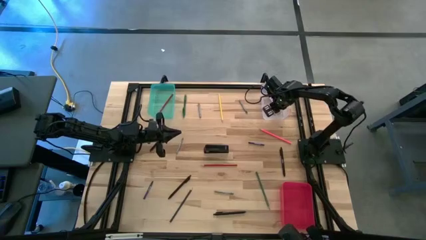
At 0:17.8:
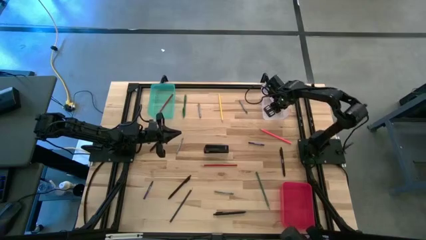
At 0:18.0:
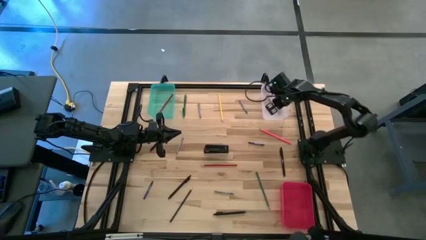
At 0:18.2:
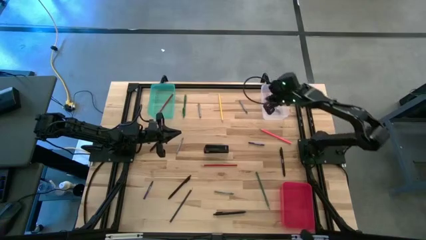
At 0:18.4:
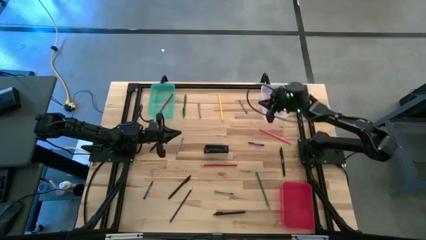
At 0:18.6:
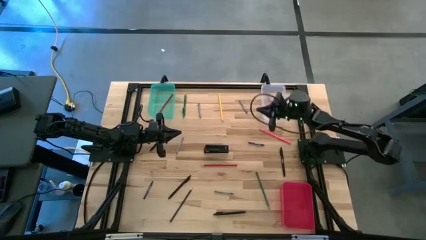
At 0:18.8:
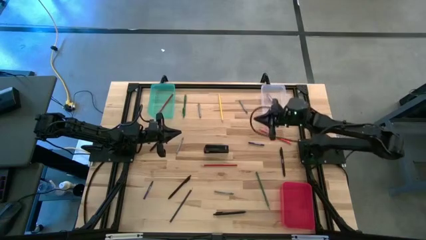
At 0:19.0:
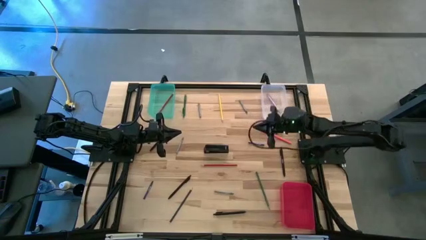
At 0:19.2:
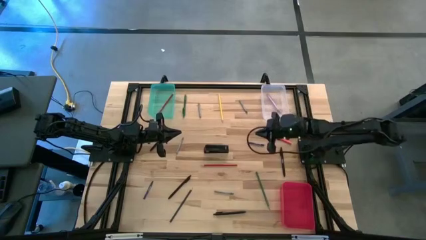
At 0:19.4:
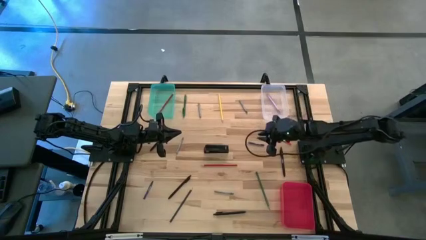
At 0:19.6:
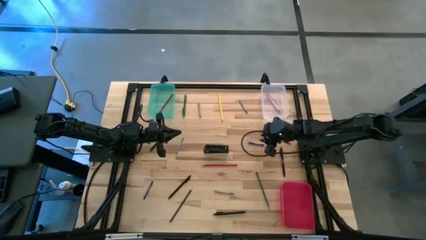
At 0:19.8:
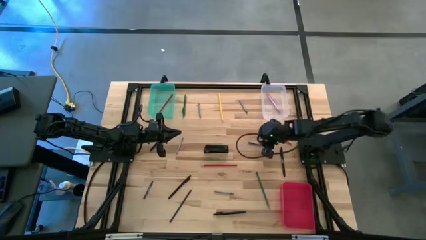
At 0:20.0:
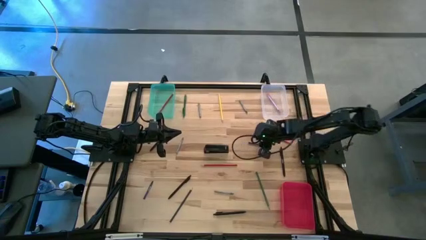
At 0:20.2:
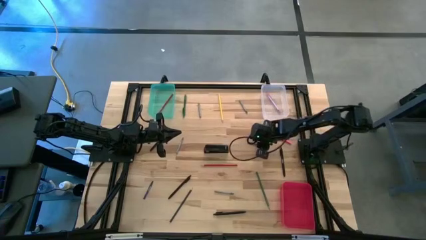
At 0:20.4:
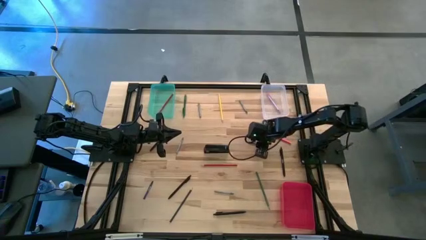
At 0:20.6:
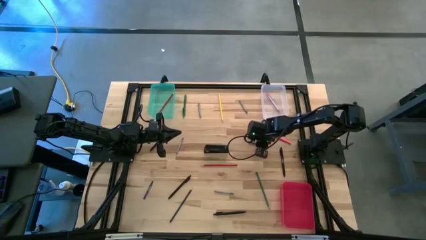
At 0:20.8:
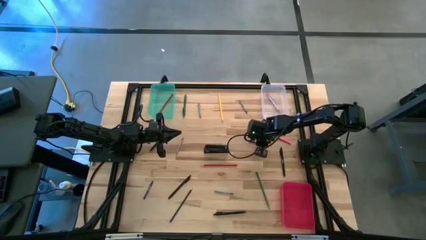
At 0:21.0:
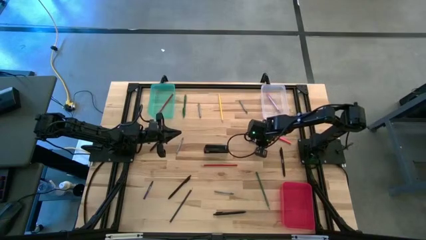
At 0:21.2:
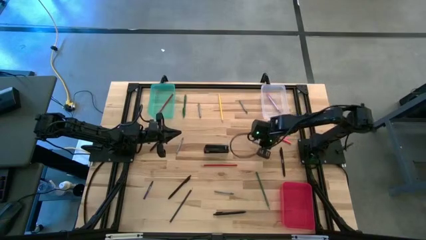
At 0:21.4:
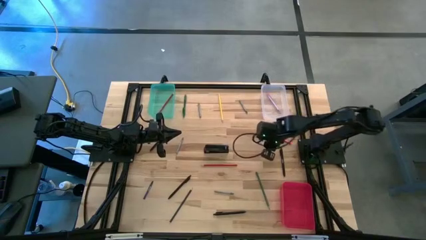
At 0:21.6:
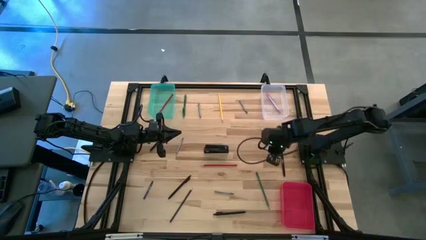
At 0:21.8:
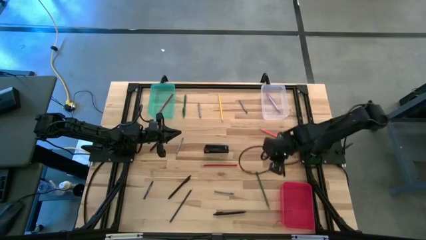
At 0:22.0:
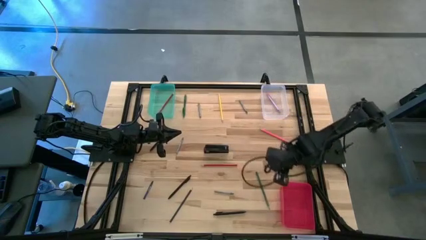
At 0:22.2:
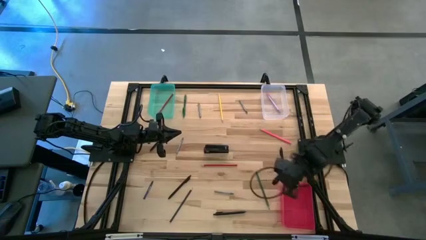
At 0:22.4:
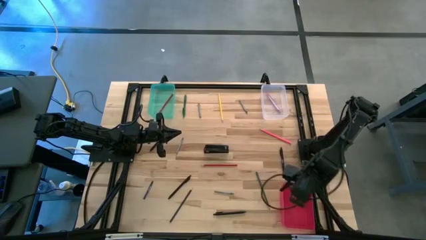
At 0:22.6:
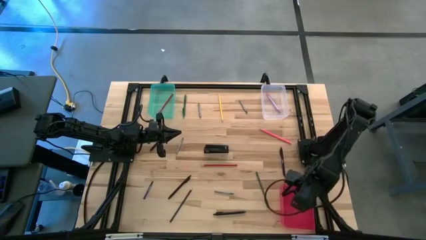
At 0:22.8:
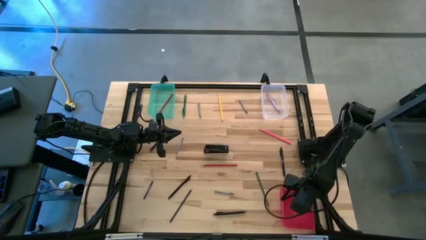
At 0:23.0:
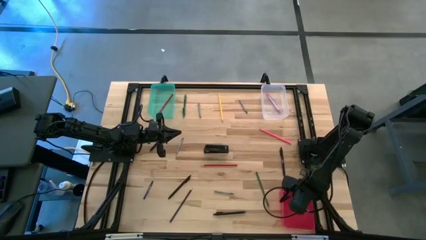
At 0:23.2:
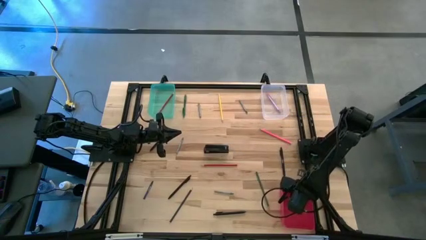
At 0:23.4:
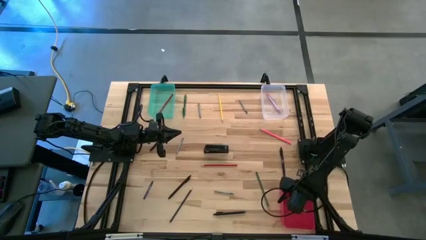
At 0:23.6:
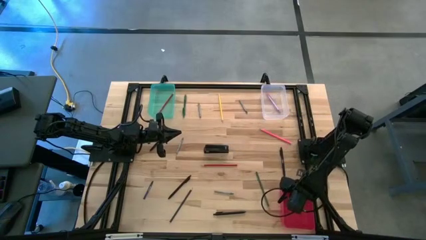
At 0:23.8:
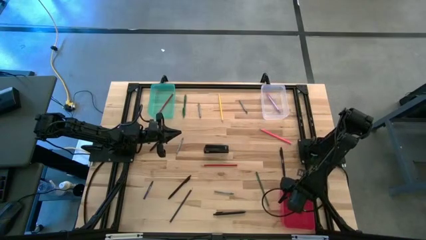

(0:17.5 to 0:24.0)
Task: Sort crayons/erasers/pens/pencils in bins
Put the blue crayon into the red bin

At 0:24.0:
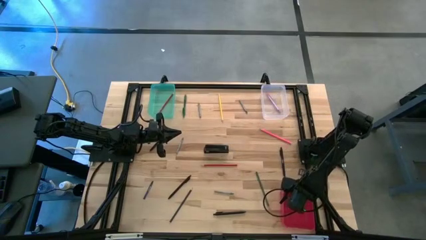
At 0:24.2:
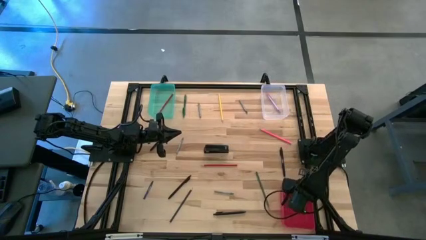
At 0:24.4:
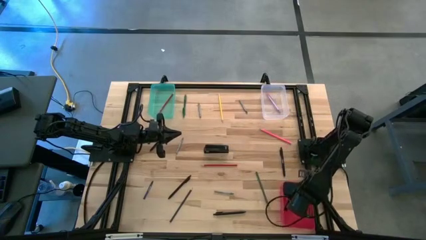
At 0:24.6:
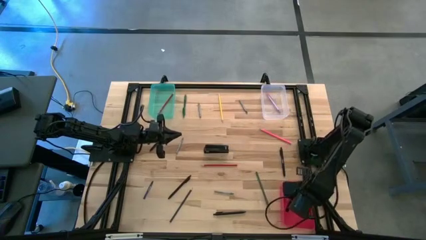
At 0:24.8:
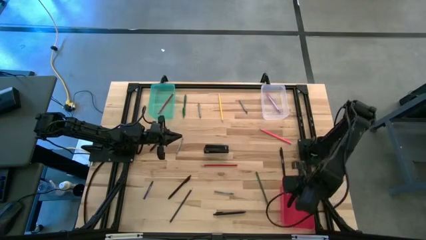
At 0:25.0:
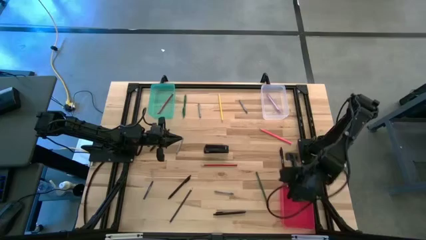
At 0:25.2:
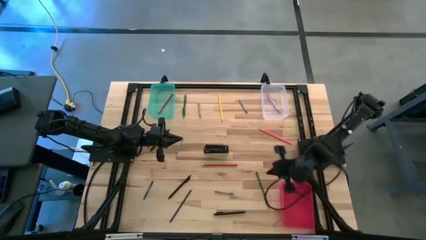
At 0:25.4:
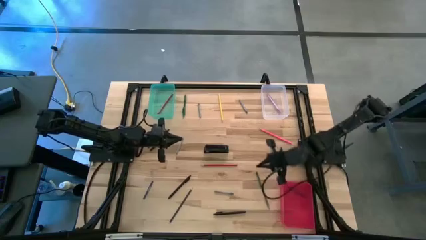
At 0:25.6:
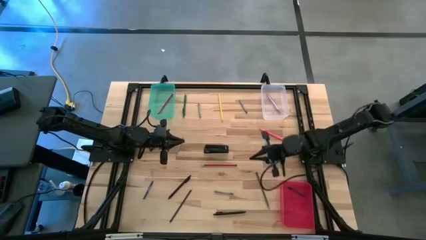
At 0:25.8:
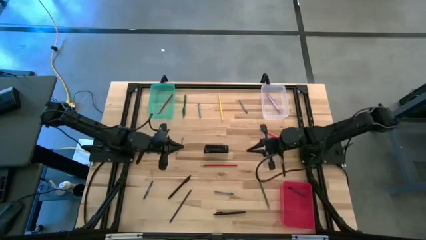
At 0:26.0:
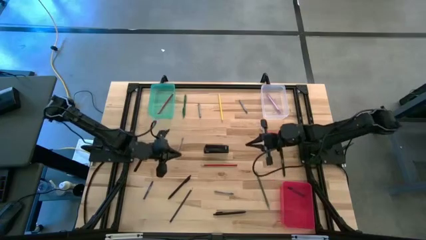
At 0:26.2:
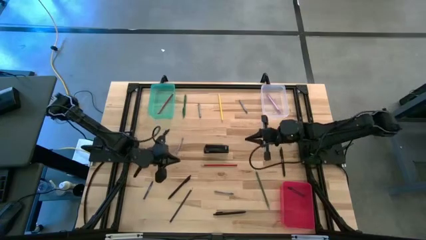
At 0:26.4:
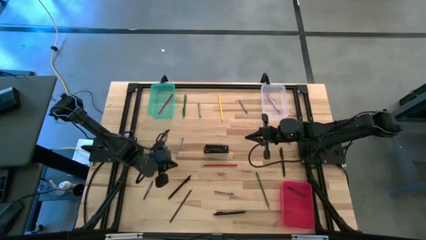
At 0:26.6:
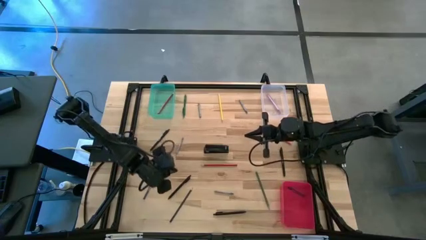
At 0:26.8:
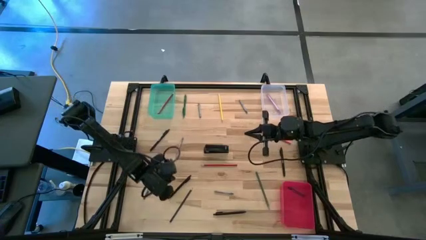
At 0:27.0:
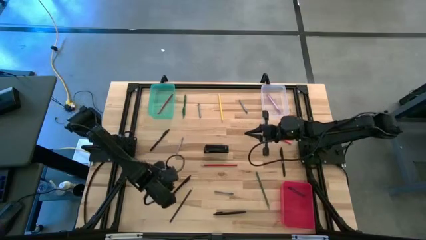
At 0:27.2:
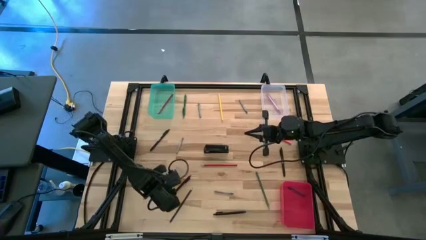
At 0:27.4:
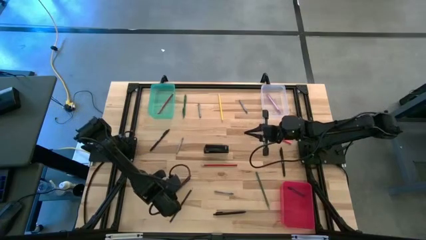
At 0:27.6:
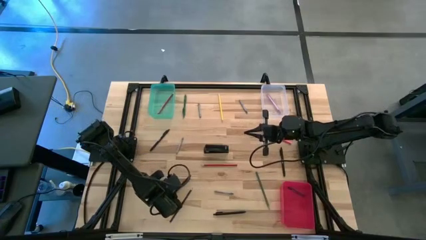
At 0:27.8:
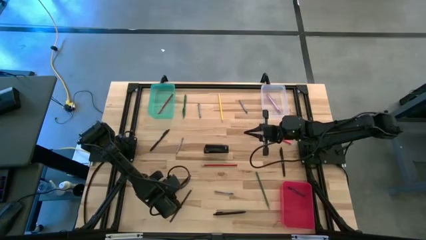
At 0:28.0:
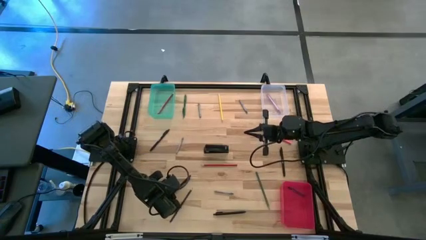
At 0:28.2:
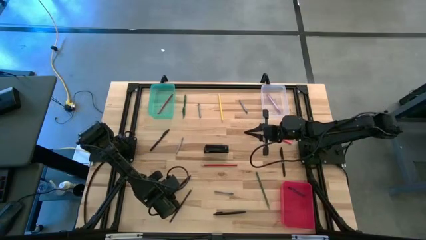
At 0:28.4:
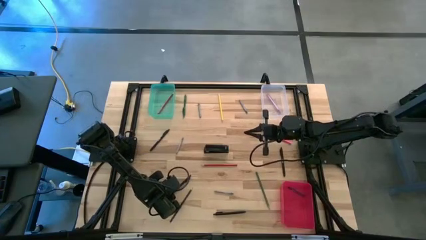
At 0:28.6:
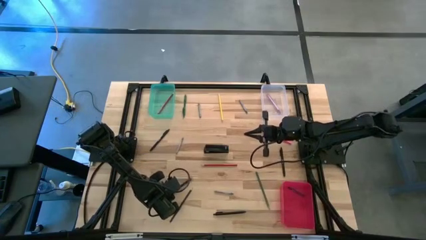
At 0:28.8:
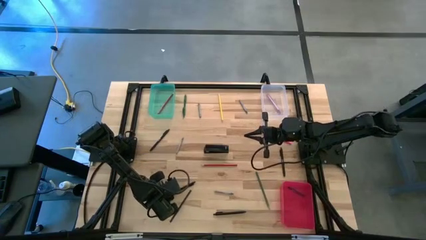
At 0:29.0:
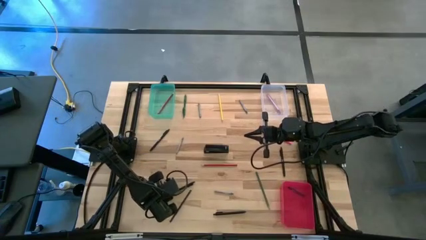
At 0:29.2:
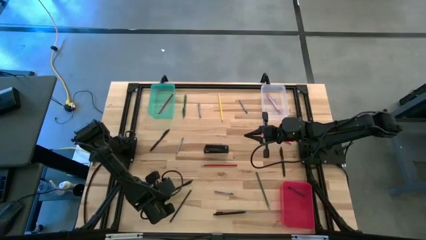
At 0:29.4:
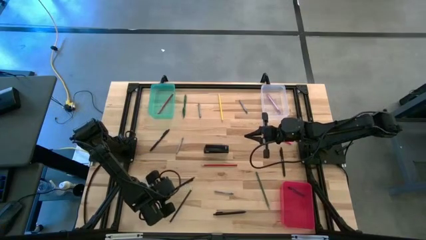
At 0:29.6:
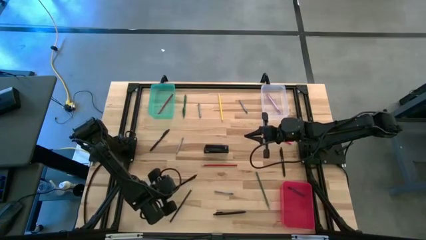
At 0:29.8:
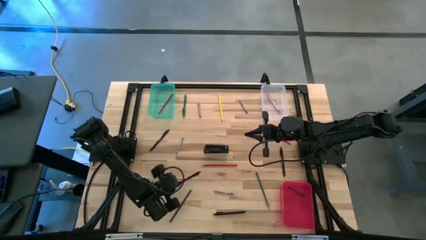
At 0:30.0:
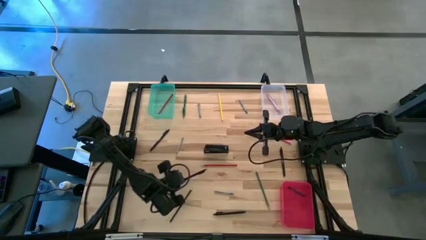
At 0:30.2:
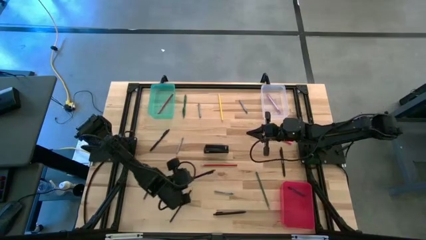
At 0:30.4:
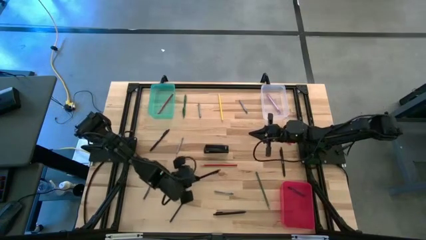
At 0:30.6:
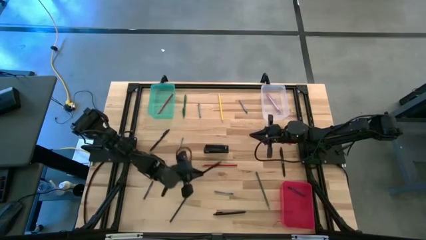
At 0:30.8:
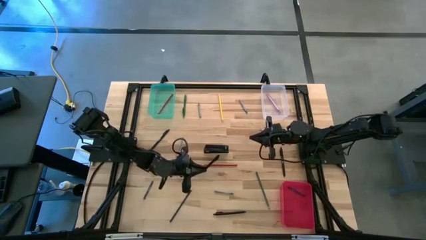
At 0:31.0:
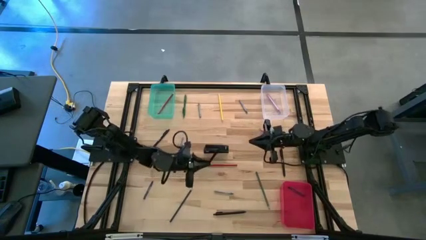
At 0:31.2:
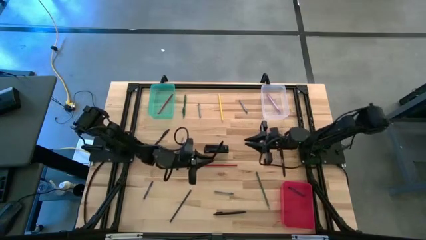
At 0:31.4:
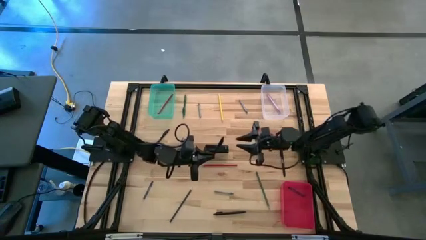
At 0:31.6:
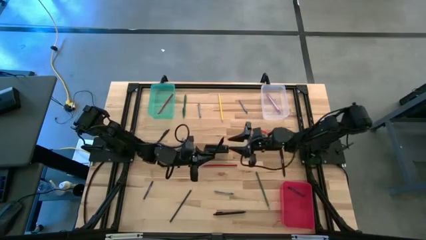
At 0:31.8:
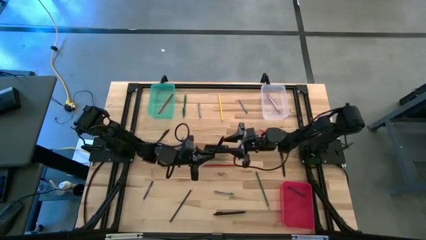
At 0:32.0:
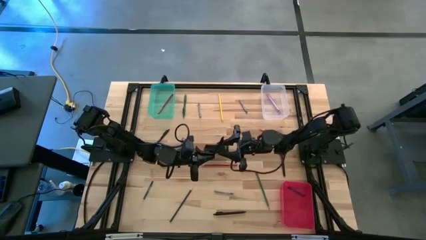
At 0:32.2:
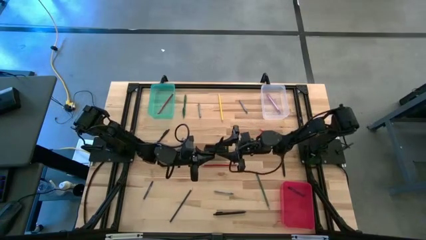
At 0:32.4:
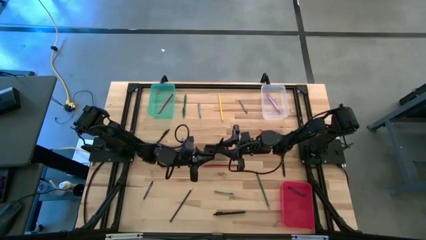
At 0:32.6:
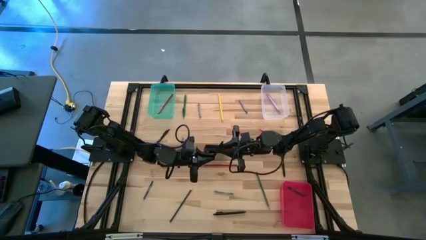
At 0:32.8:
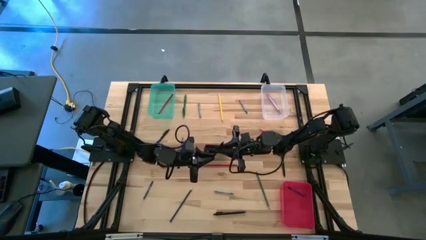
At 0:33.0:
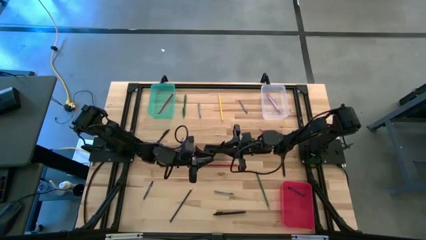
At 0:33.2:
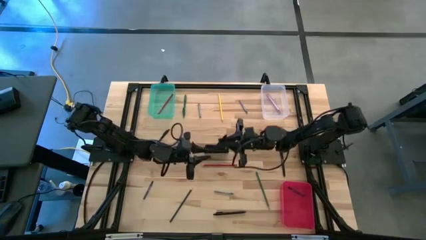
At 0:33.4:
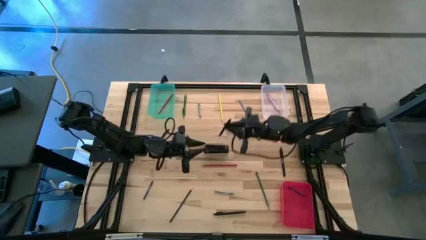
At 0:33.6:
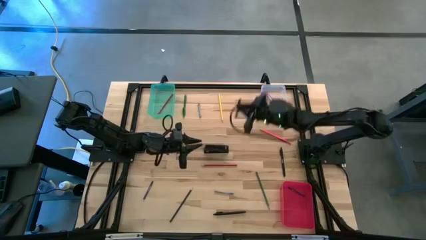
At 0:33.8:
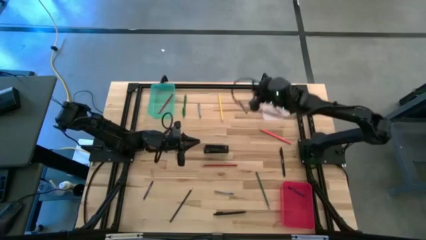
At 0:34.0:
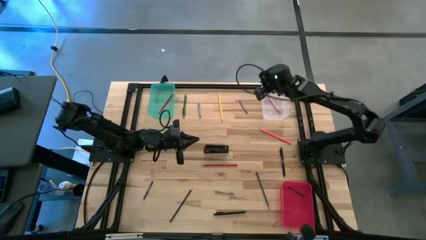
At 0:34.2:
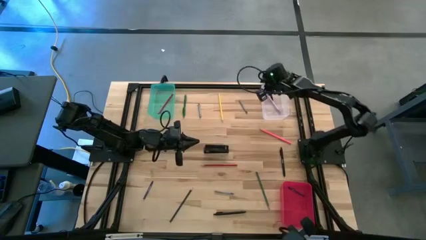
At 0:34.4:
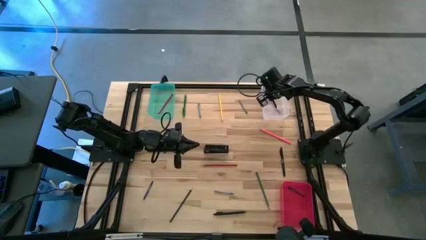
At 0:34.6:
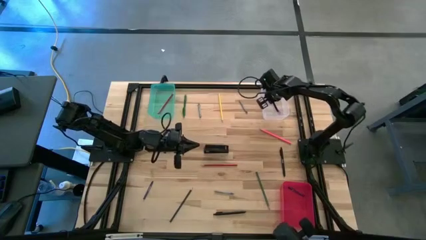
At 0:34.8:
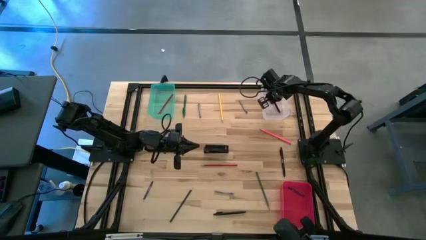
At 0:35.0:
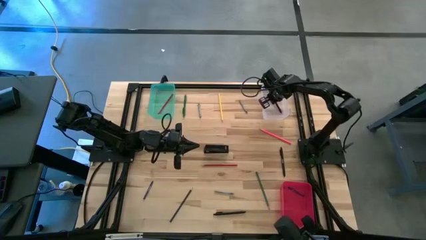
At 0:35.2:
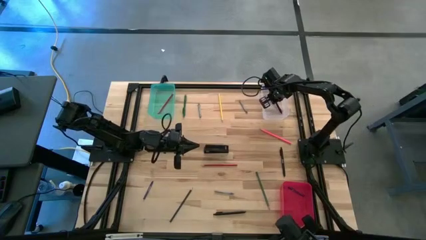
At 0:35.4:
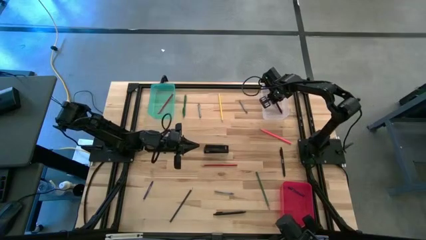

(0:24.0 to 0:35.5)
Put the black pen into the transparent bin
